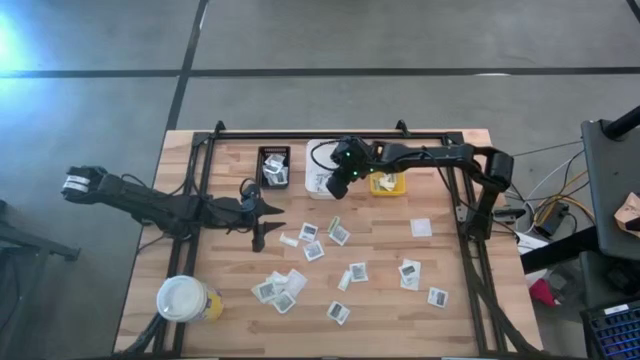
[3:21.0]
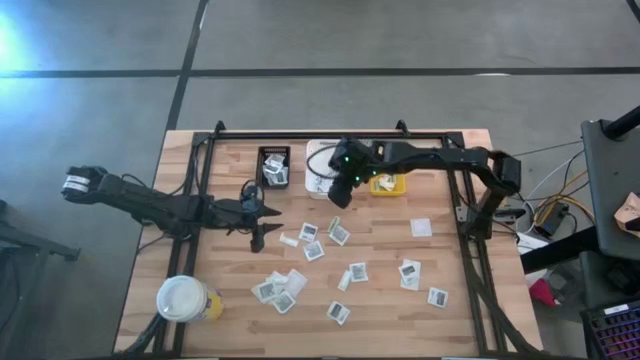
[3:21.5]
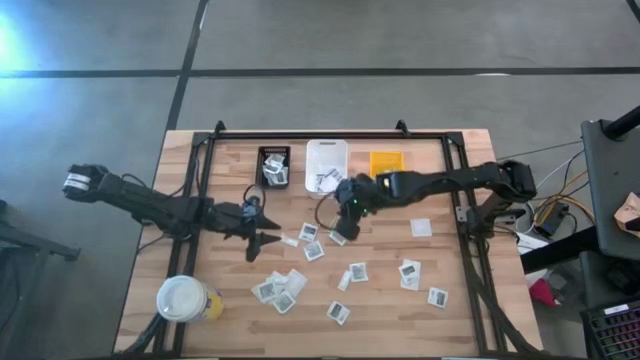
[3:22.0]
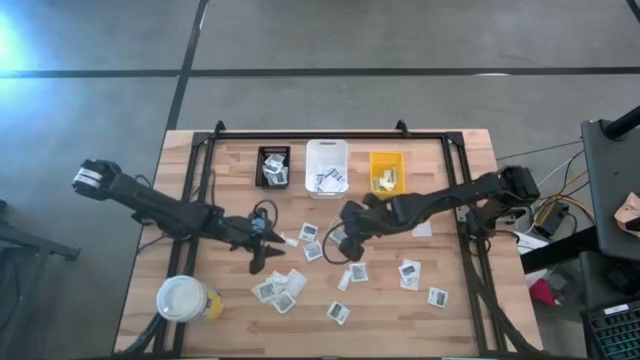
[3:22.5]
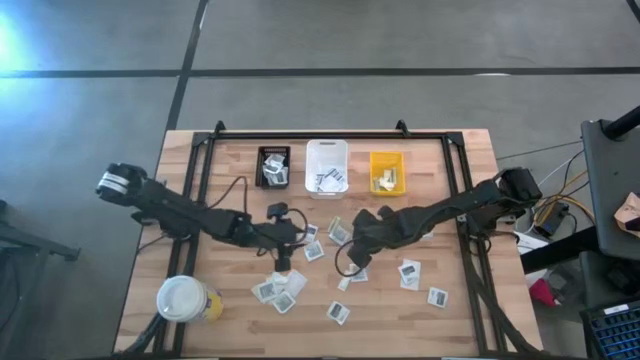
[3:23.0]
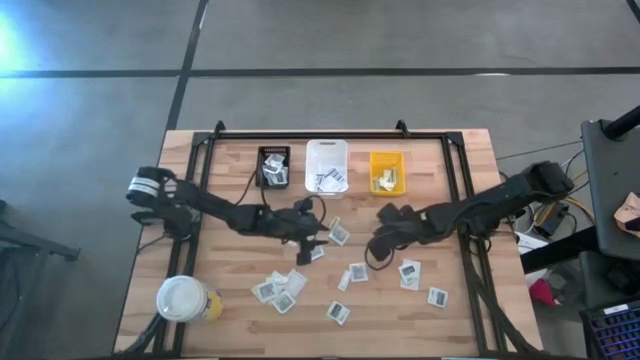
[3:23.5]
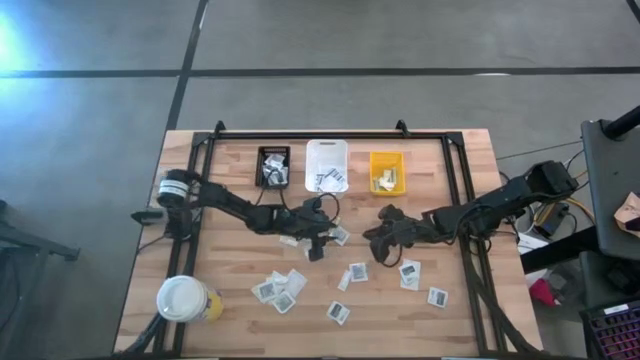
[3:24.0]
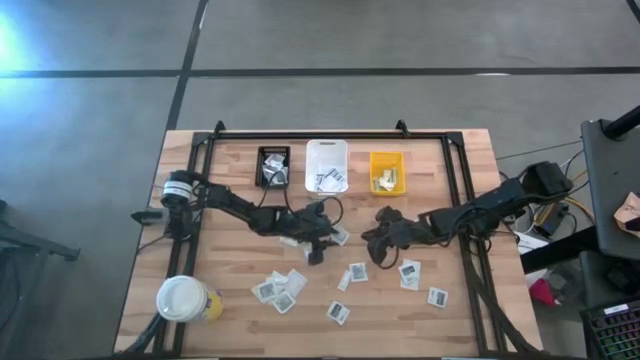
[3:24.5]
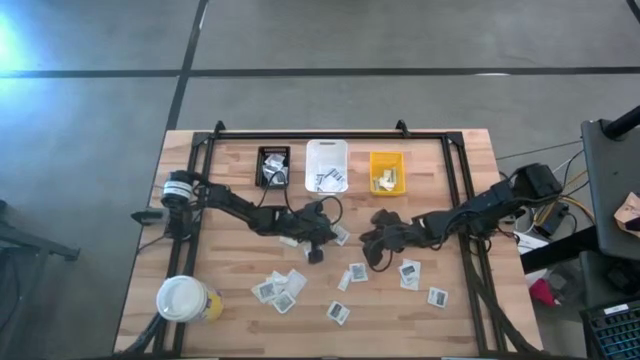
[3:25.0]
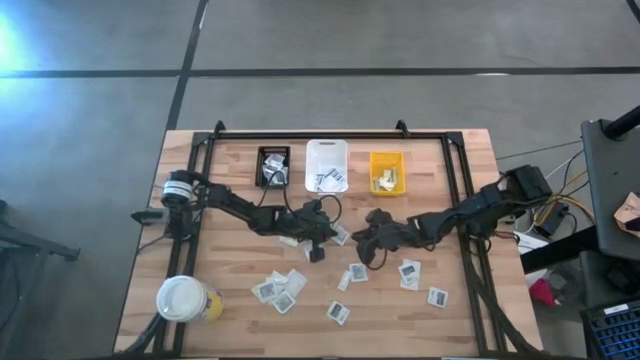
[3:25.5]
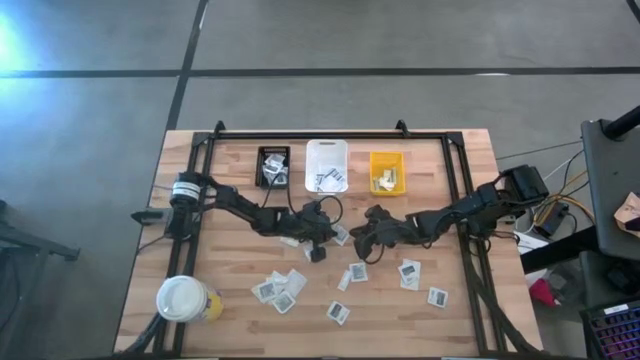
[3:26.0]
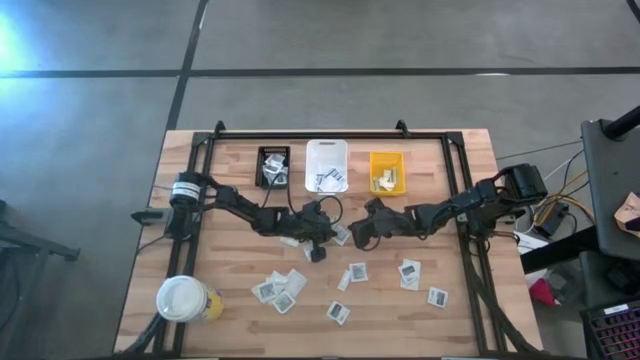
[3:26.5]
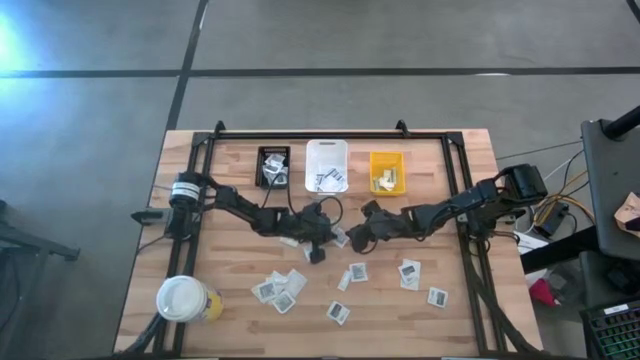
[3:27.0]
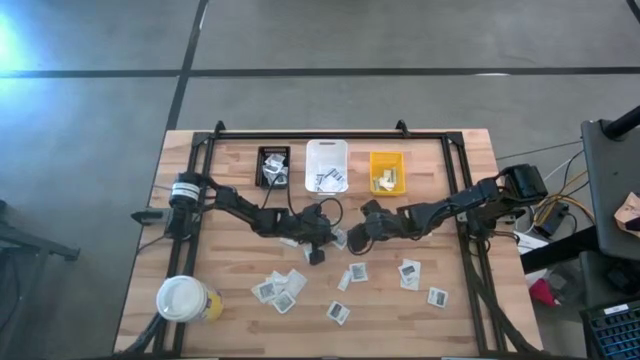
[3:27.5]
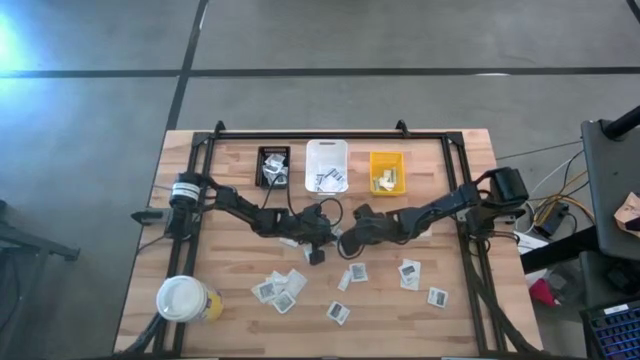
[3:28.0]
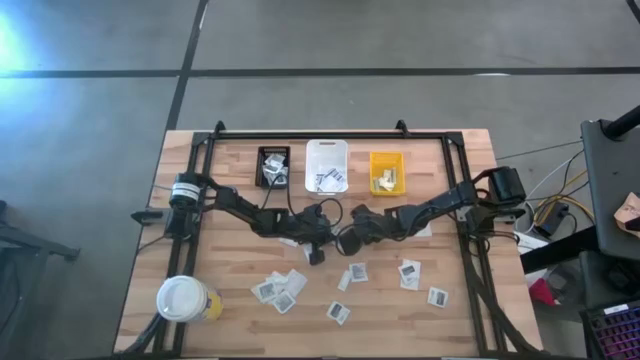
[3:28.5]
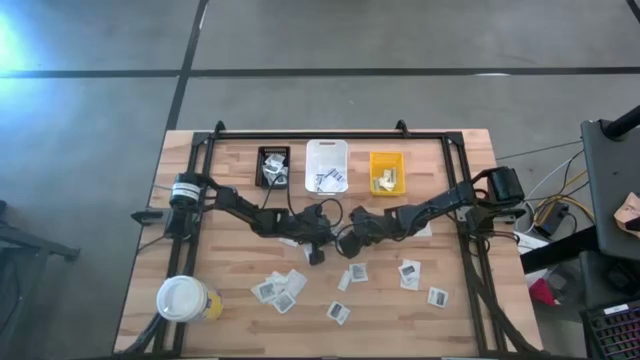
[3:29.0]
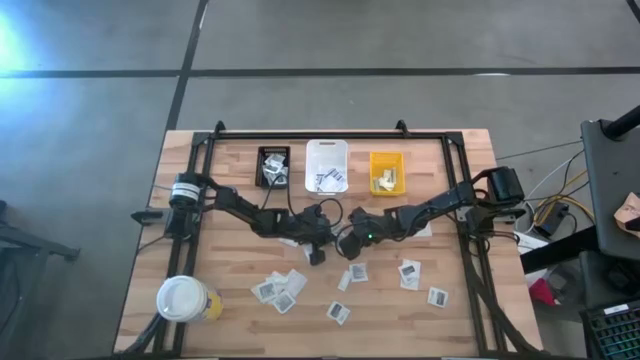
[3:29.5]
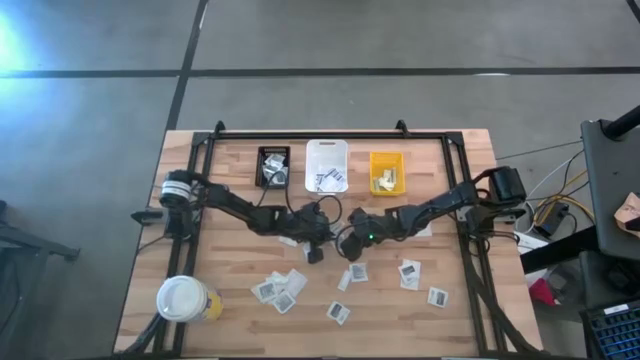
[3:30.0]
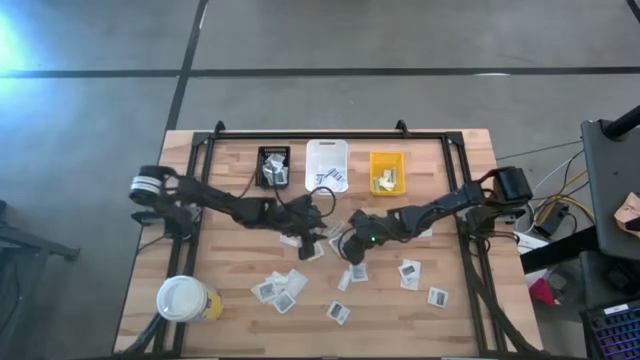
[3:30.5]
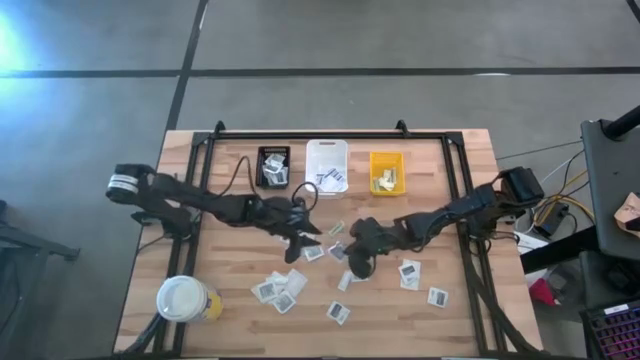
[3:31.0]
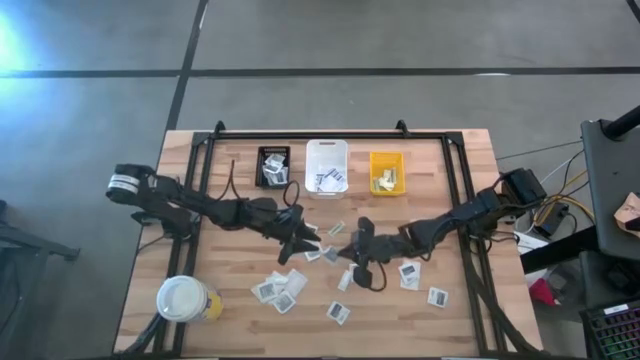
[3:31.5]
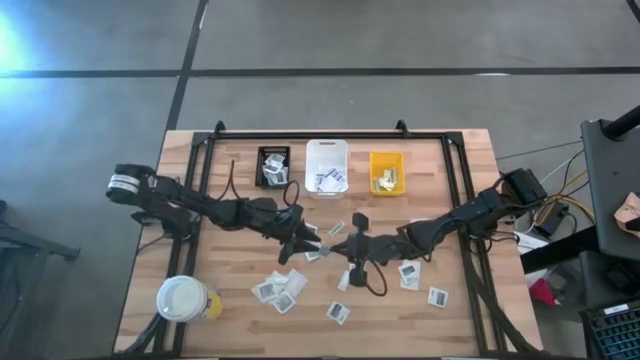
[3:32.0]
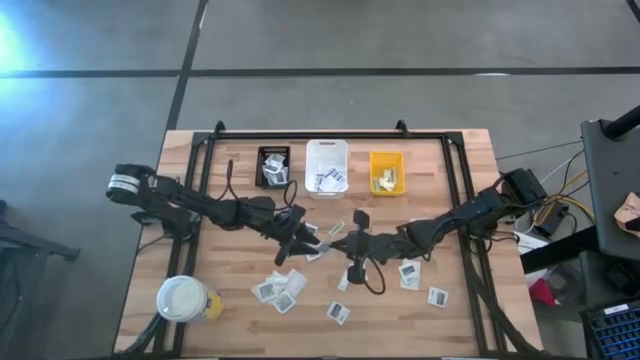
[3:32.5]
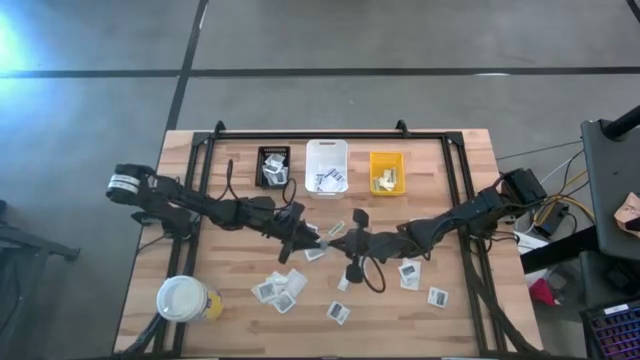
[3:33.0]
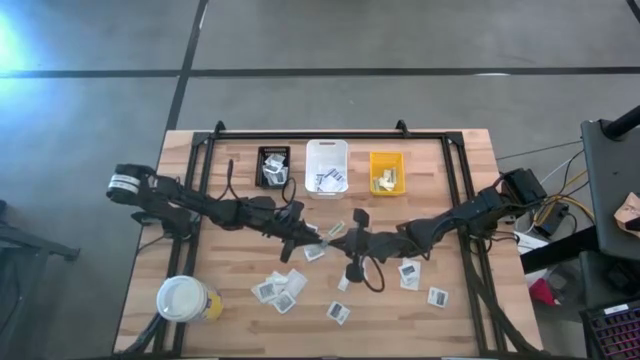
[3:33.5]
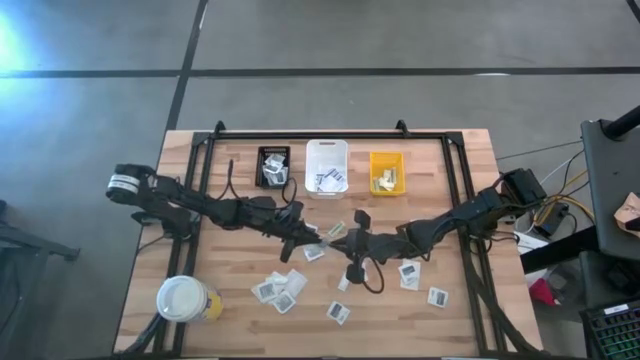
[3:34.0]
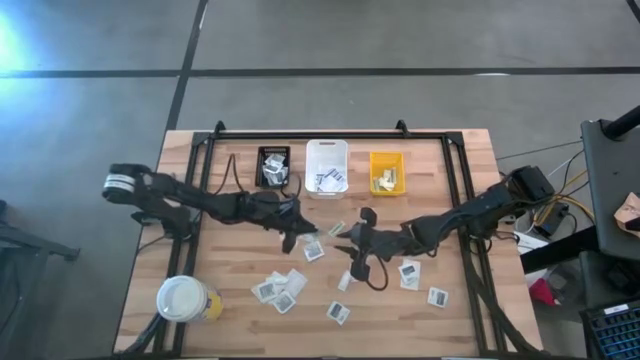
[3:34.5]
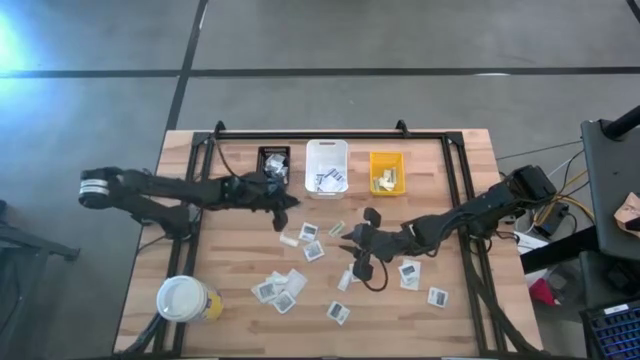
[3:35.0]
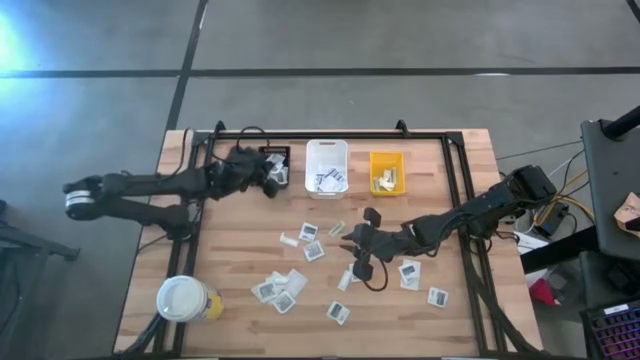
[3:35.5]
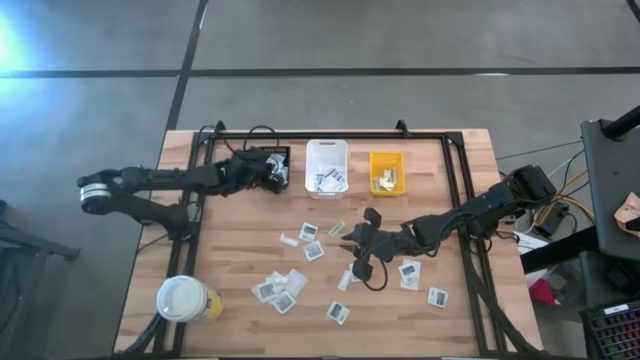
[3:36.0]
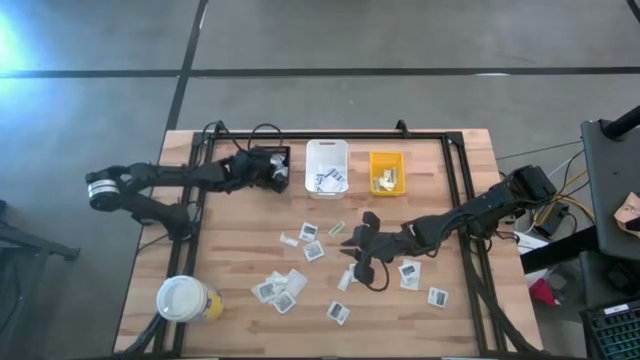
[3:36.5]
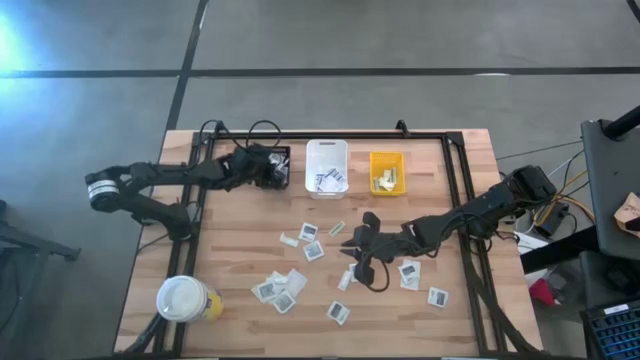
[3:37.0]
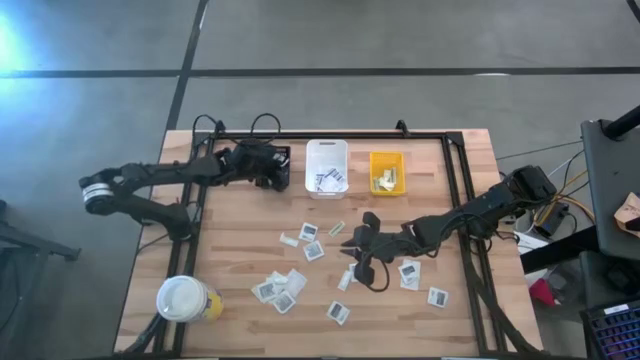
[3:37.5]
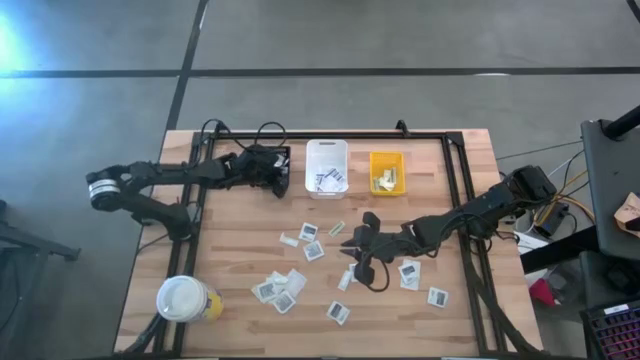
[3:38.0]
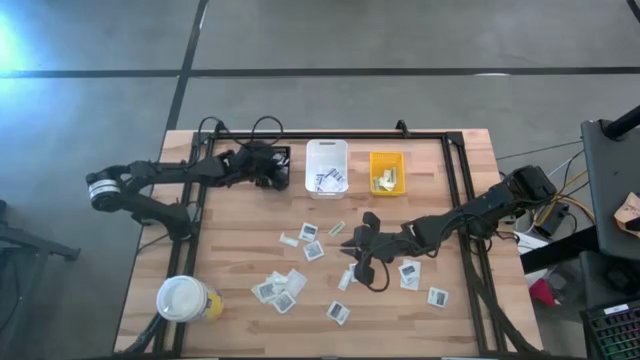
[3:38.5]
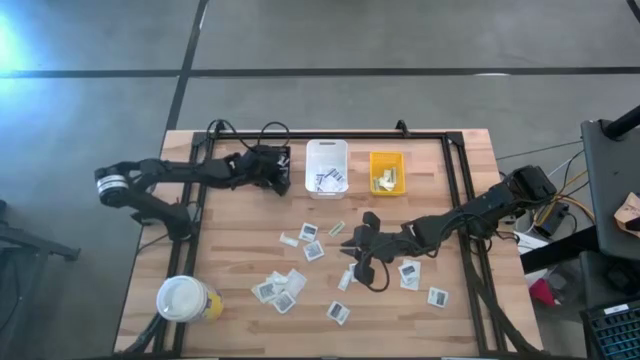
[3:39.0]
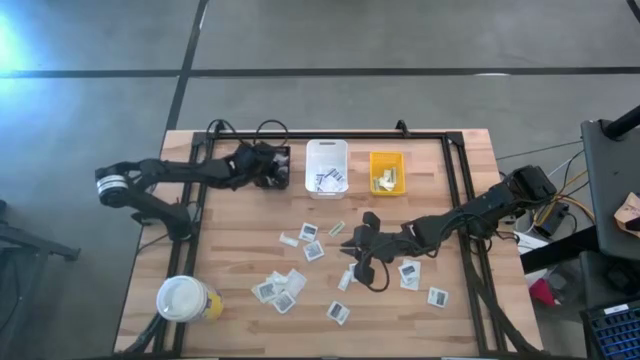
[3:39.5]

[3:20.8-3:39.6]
Task: Pick & Place First Aid Supplies
Put the towelette pack into the black basket

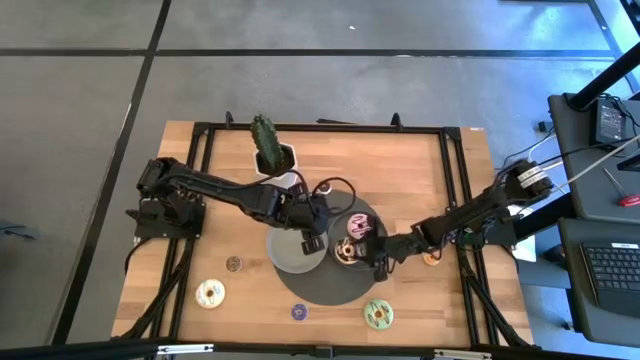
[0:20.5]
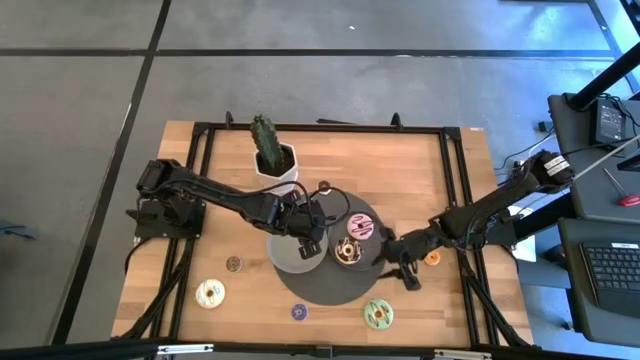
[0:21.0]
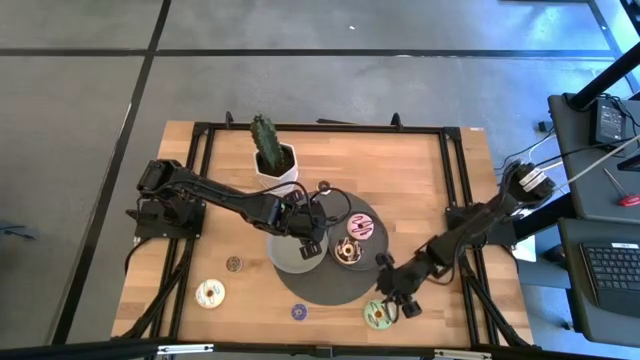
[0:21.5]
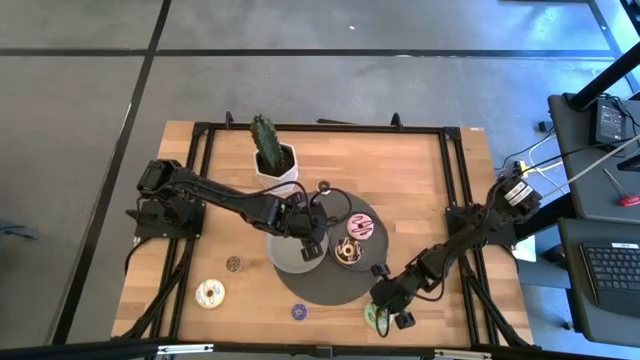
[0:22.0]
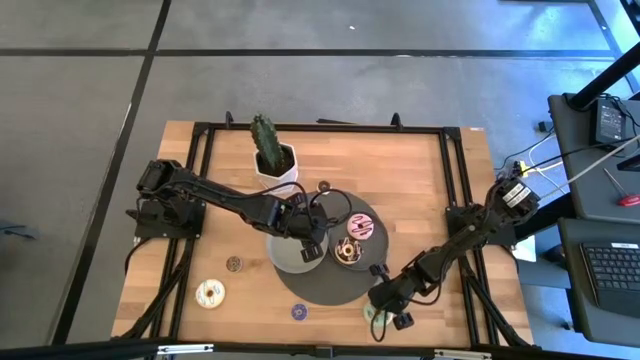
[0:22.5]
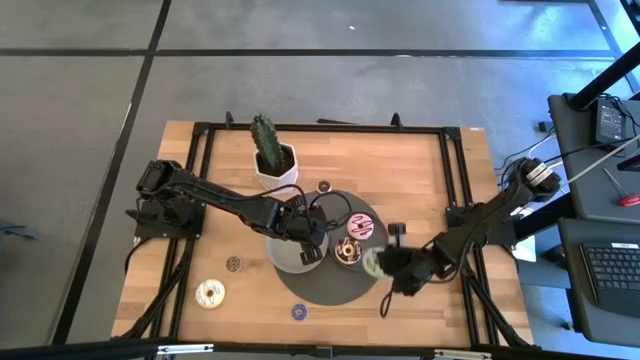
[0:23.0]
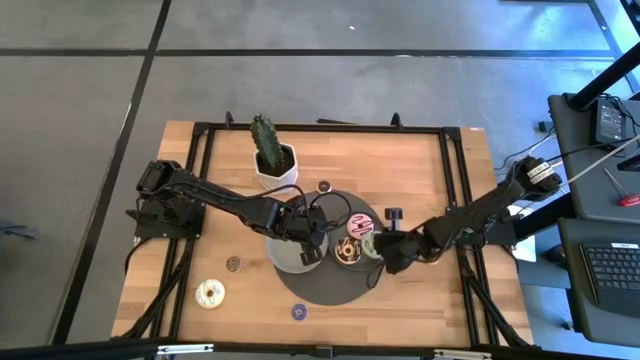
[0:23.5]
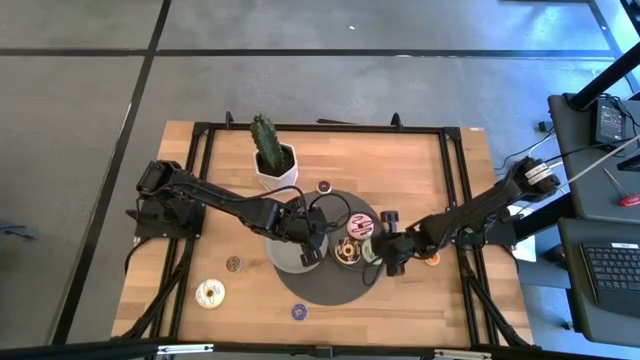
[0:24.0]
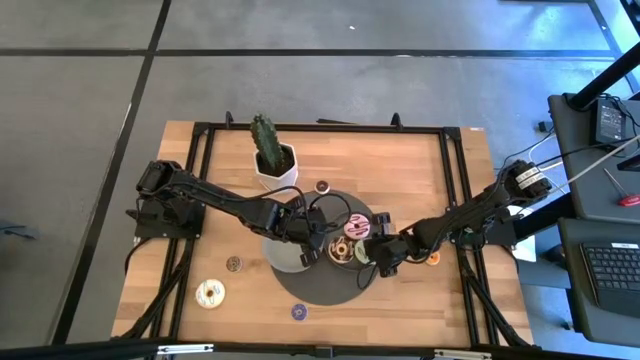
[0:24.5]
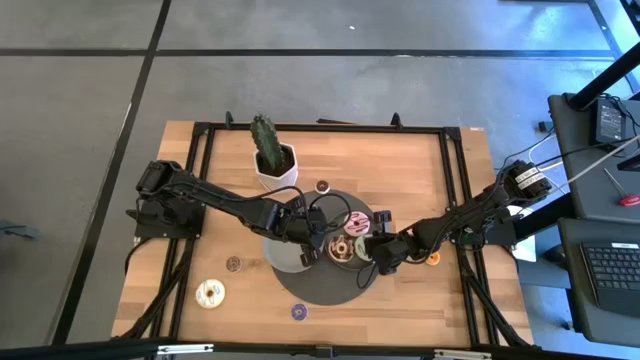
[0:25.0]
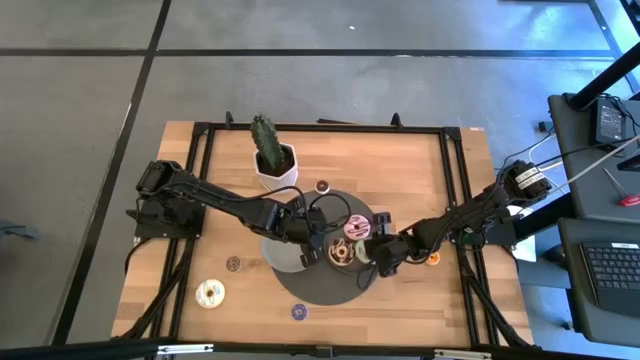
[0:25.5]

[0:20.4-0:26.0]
Task: Pick & Place donuts
Put the large blue donut on the dark gray plate
